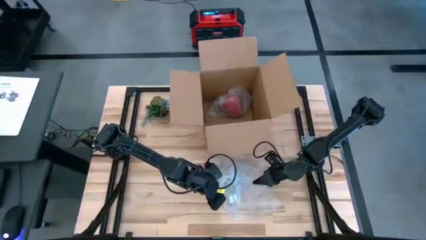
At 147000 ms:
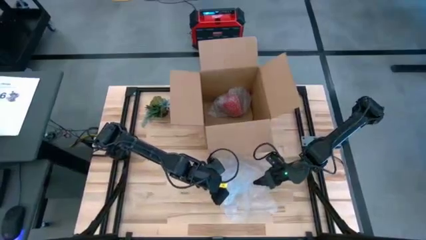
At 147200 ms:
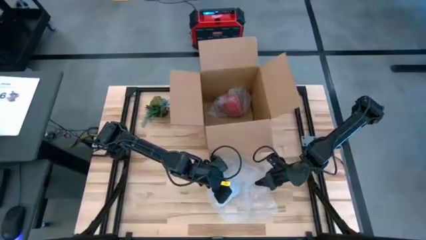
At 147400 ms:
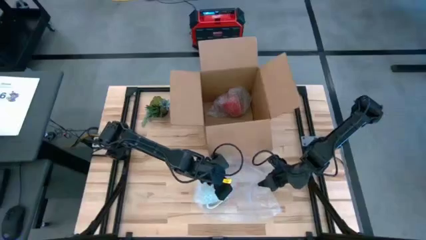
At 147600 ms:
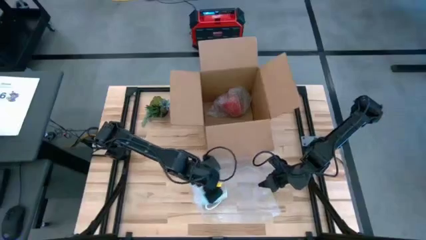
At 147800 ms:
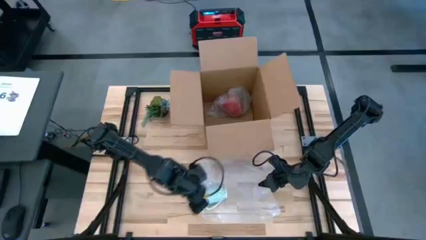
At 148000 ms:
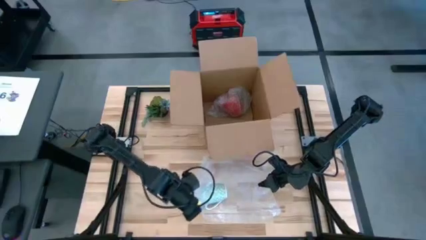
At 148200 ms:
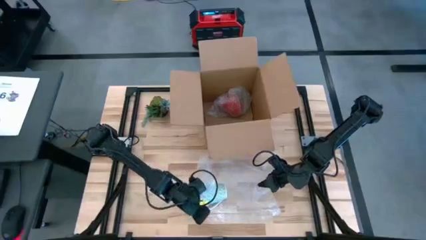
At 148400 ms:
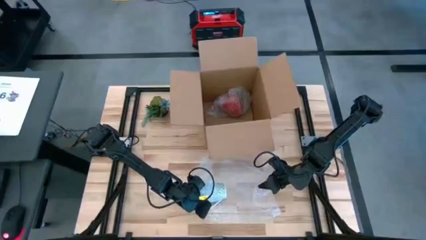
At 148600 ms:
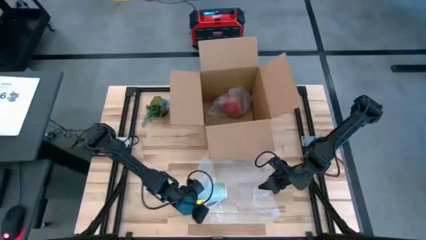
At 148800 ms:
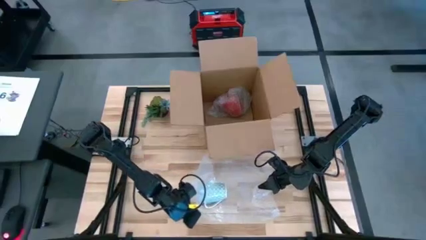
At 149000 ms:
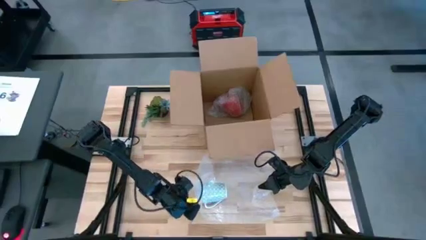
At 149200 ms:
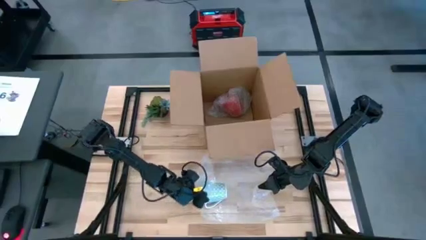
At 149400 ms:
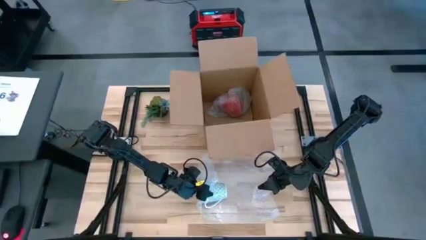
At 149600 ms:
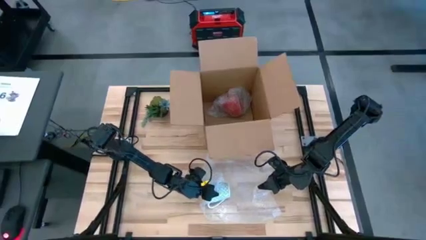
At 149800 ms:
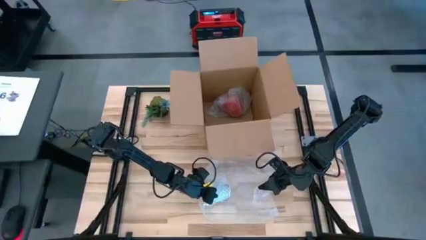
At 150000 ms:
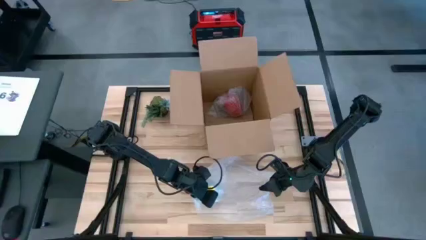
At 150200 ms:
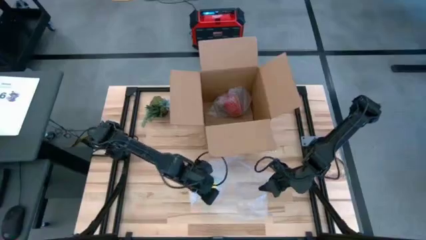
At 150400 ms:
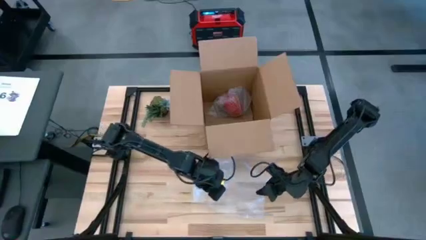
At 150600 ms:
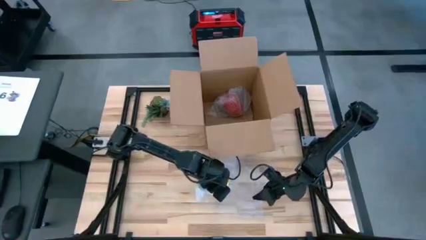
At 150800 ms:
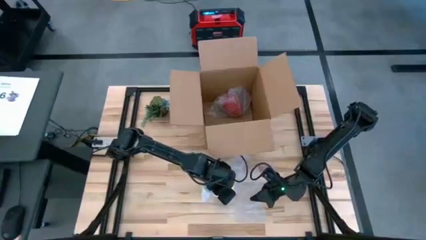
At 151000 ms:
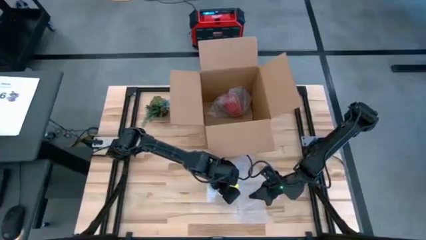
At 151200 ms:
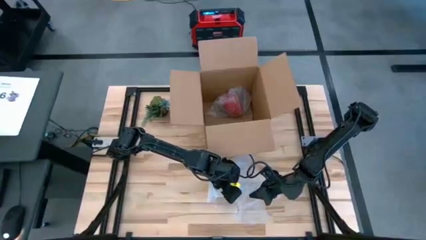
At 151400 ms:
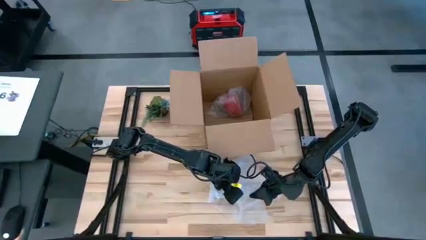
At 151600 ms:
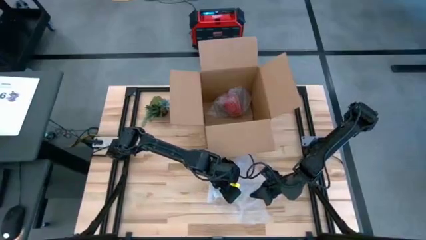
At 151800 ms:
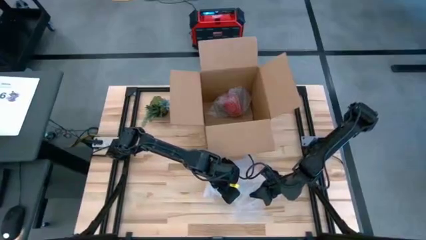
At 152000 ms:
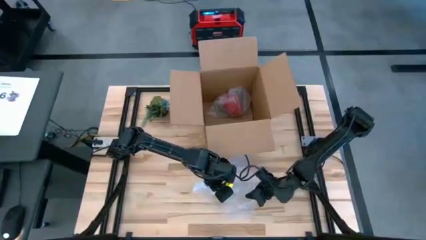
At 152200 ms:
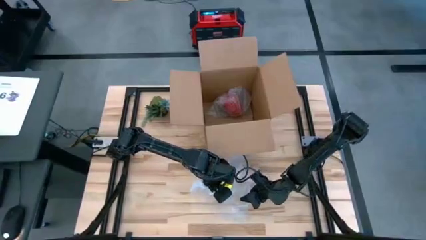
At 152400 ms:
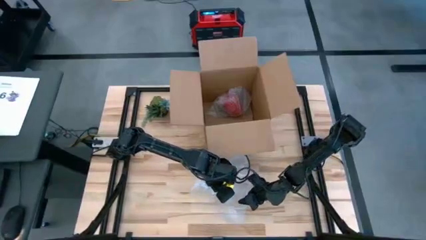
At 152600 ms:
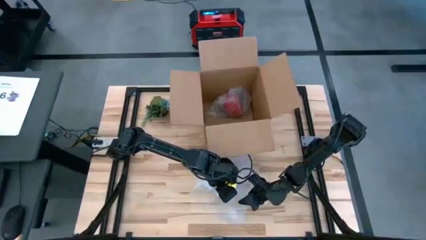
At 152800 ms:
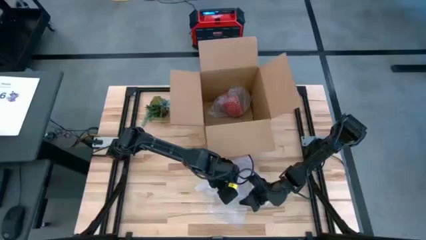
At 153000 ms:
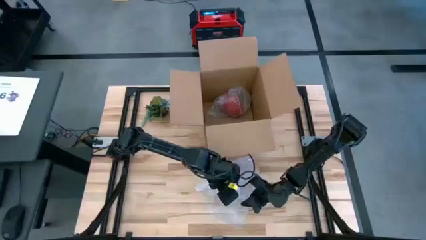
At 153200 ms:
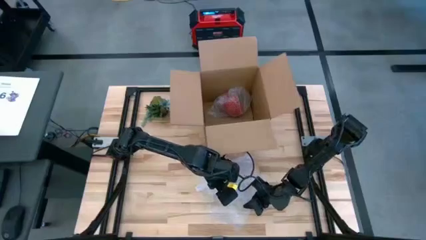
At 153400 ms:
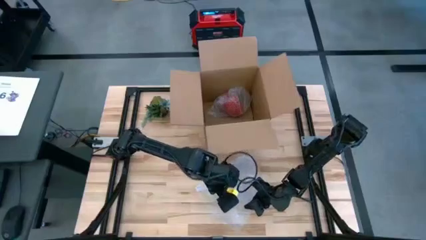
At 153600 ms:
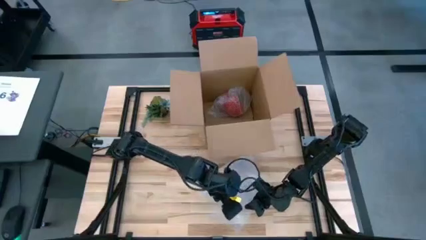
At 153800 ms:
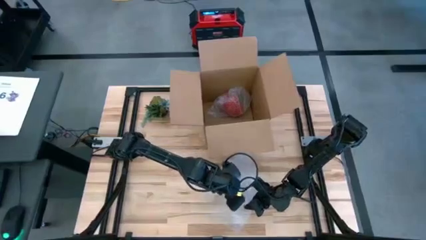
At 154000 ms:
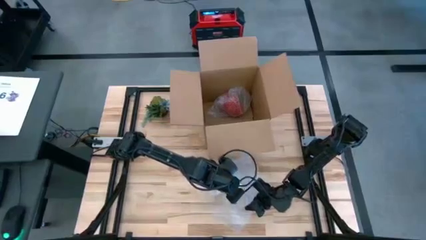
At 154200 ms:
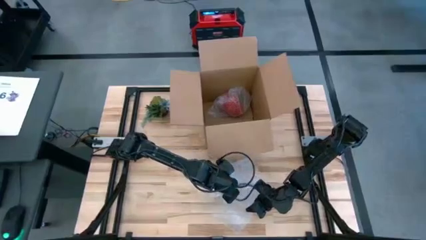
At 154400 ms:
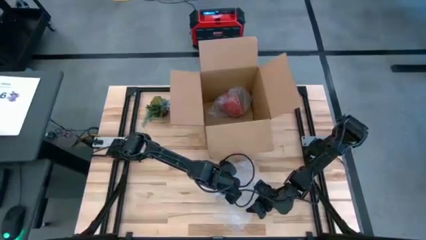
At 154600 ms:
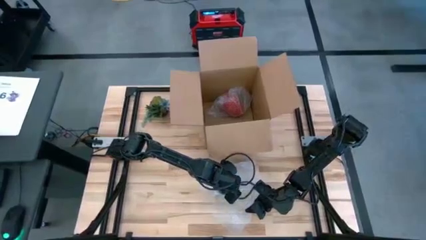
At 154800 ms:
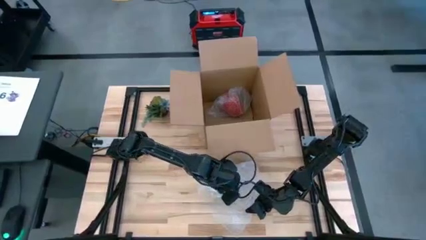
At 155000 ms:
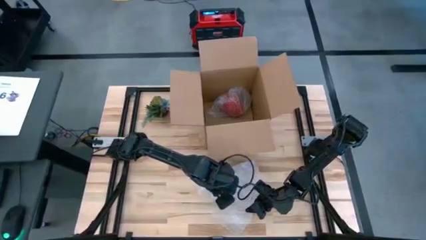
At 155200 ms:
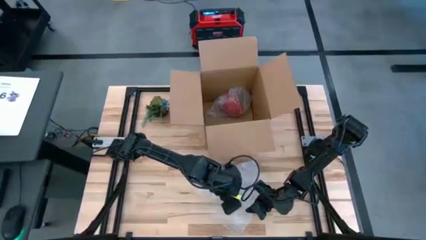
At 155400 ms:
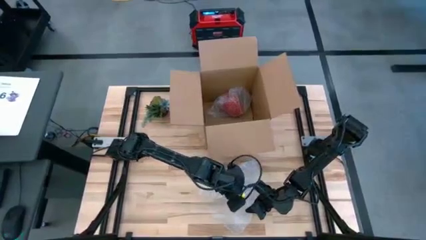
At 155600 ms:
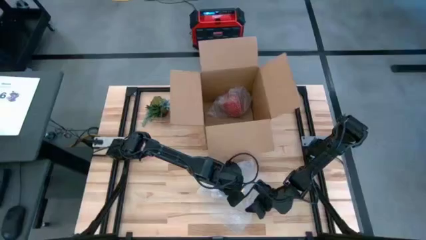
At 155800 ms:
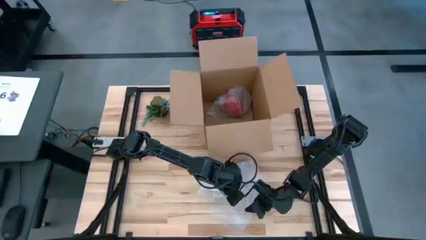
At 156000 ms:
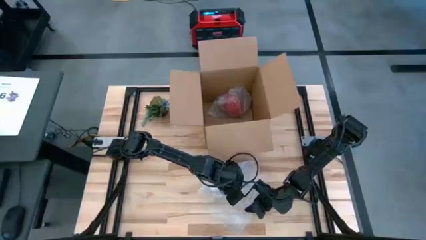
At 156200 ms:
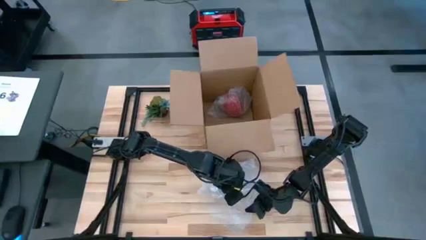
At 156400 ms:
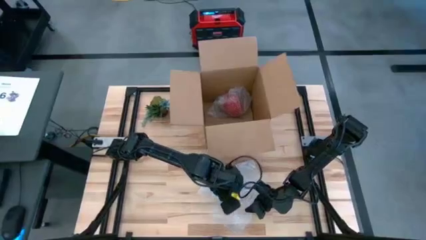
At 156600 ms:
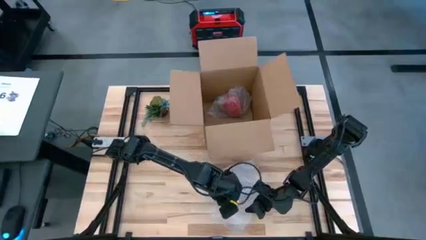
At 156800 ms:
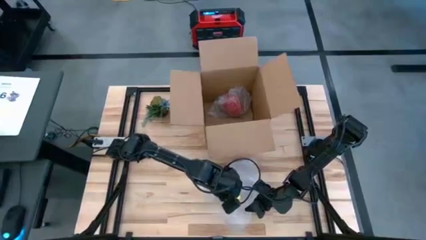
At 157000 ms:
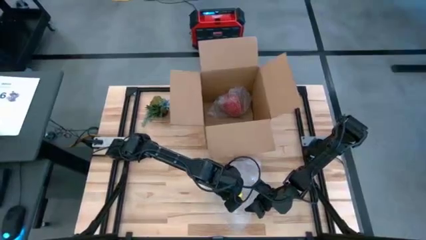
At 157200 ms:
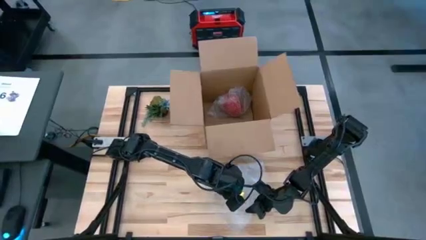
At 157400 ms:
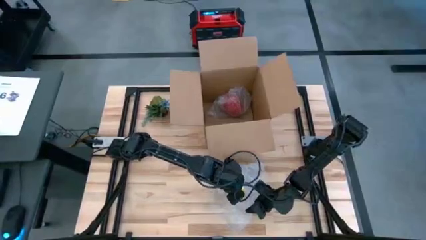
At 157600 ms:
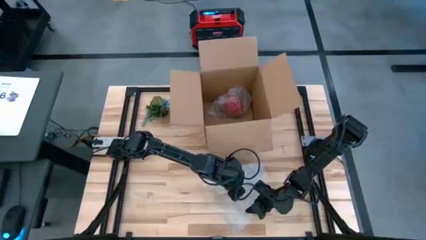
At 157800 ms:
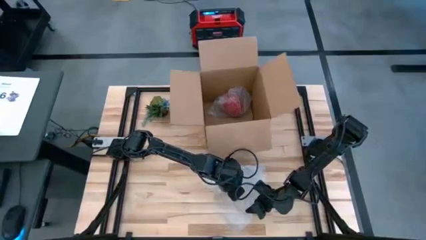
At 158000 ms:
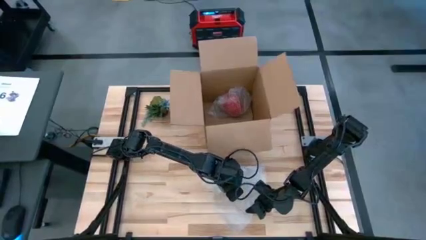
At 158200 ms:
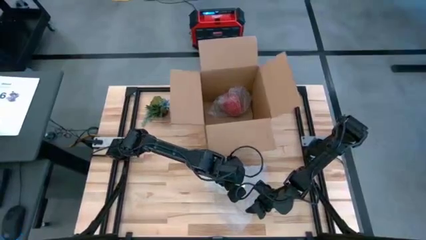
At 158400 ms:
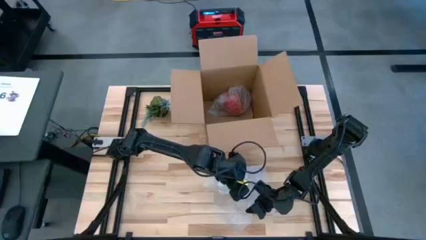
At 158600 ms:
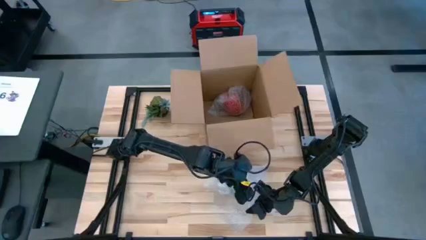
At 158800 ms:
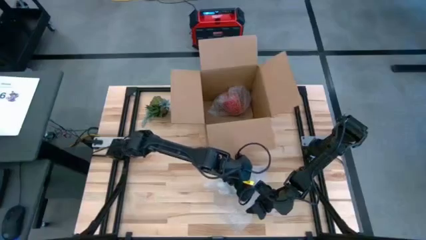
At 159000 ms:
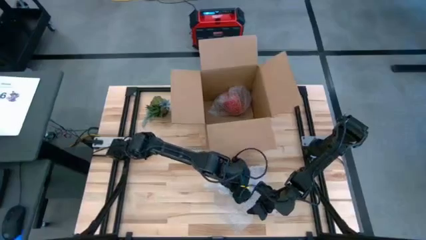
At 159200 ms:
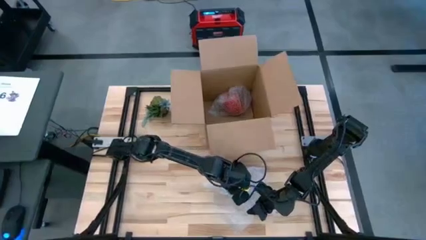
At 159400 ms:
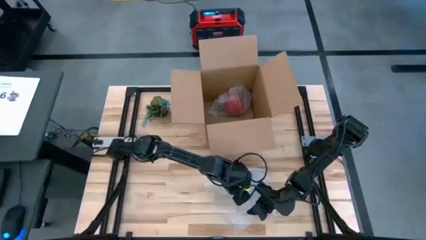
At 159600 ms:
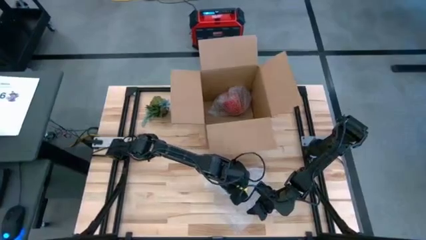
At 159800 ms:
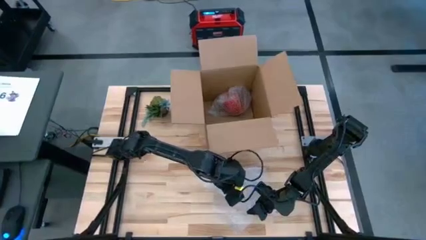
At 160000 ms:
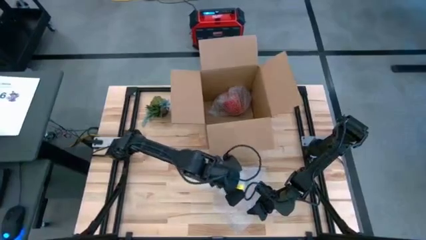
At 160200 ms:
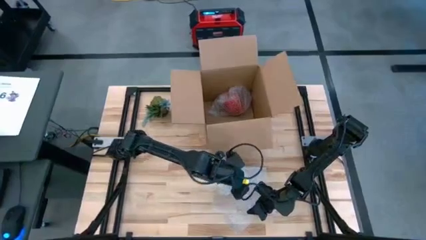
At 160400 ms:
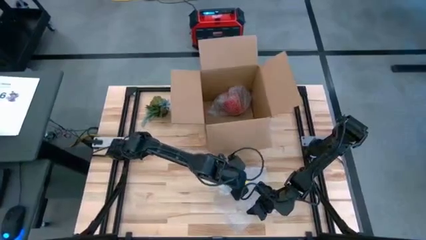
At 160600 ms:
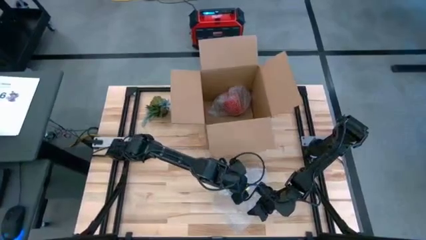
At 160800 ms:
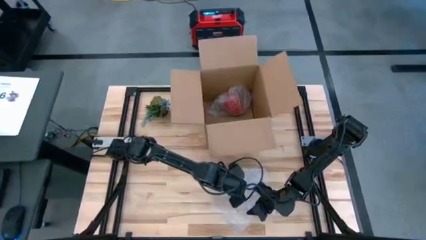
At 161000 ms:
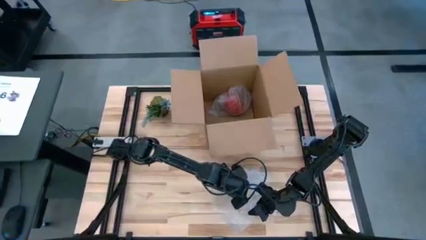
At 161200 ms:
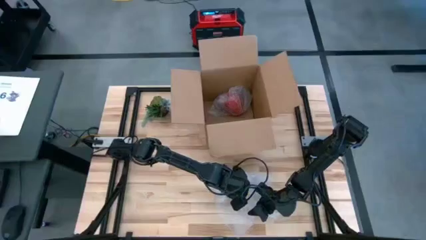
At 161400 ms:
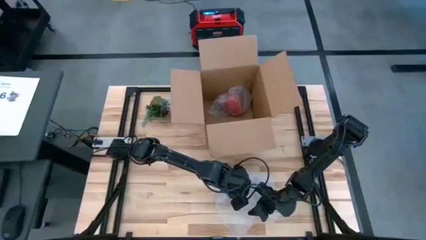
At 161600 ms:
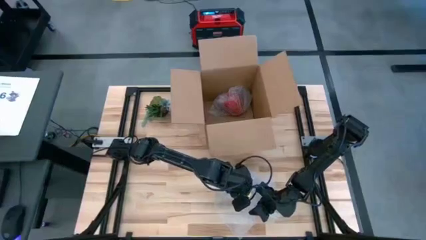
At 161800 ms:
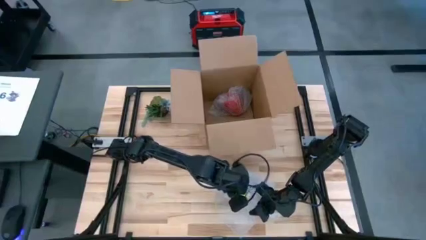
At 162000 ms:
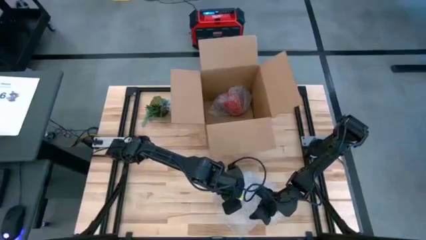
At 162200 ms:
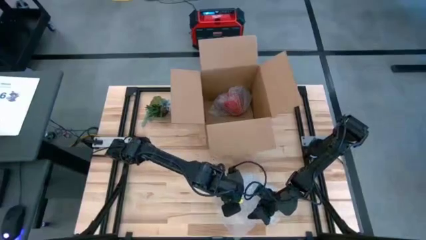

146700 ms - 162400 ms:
Task: wrap mug
Wrap the white mug with bubble wrap
